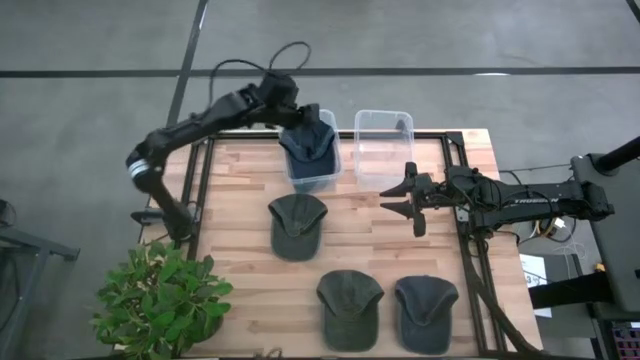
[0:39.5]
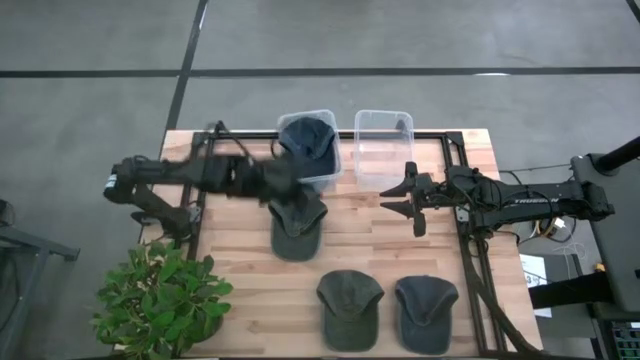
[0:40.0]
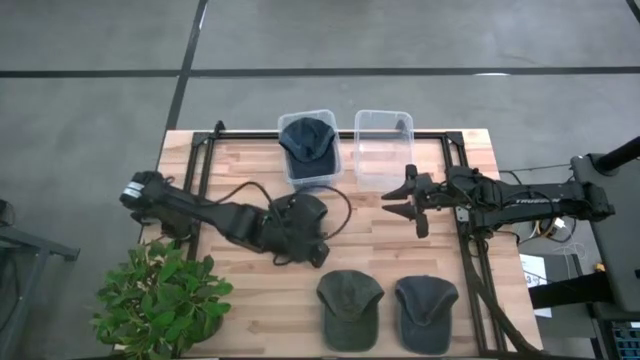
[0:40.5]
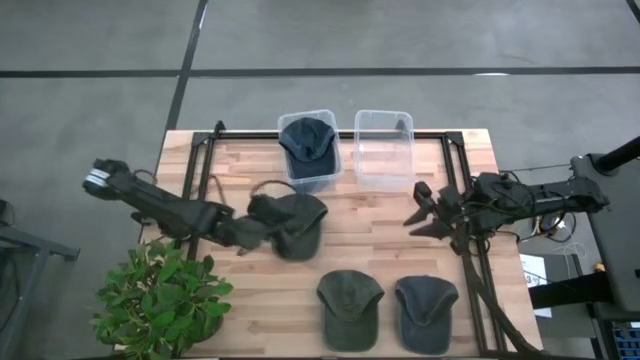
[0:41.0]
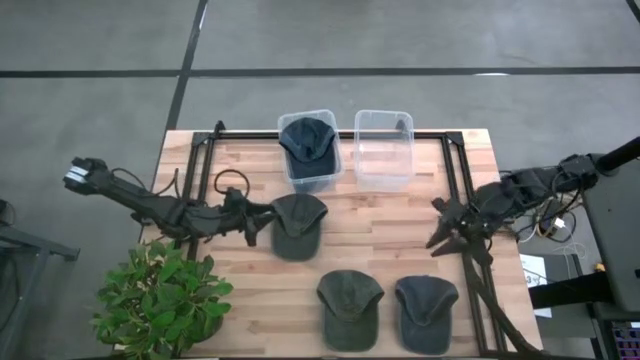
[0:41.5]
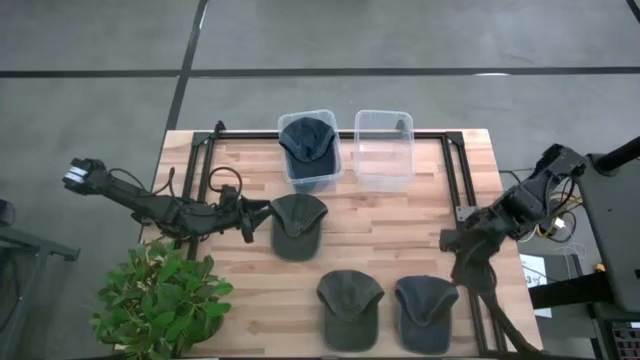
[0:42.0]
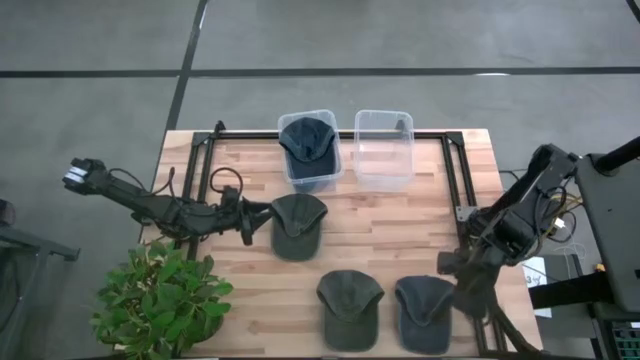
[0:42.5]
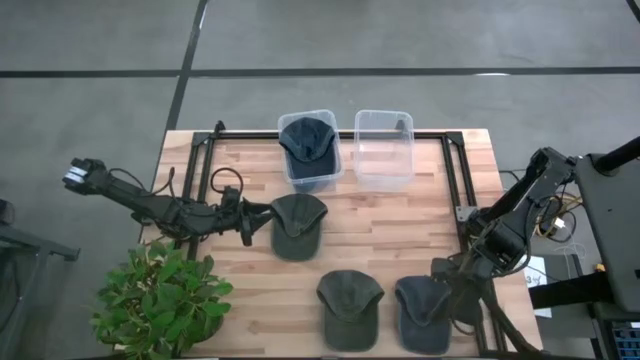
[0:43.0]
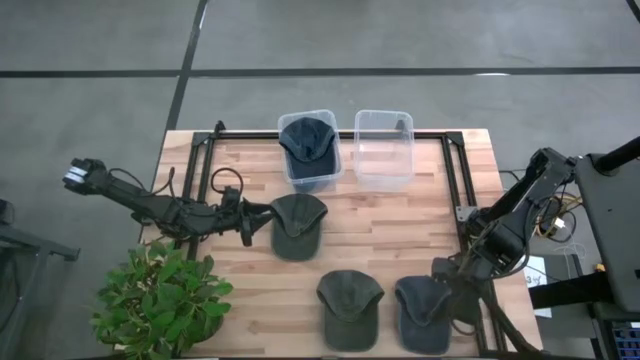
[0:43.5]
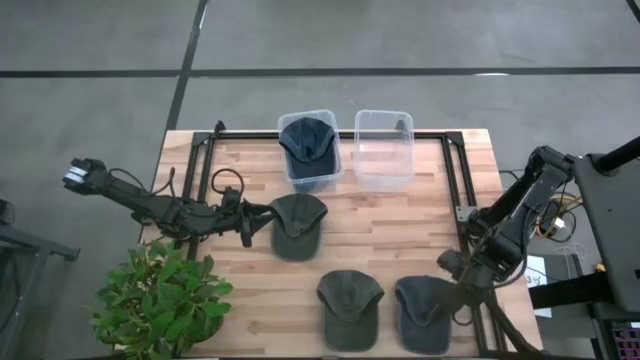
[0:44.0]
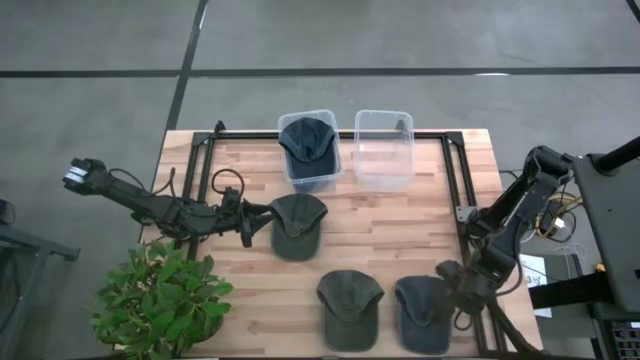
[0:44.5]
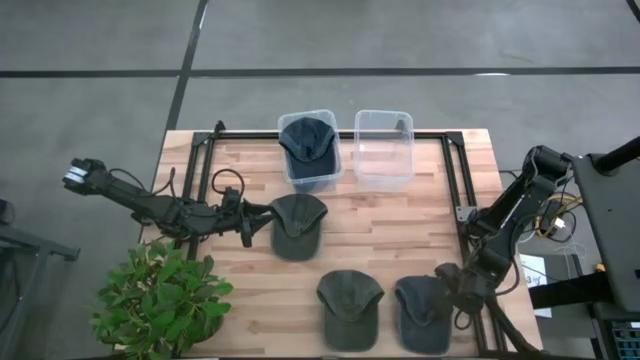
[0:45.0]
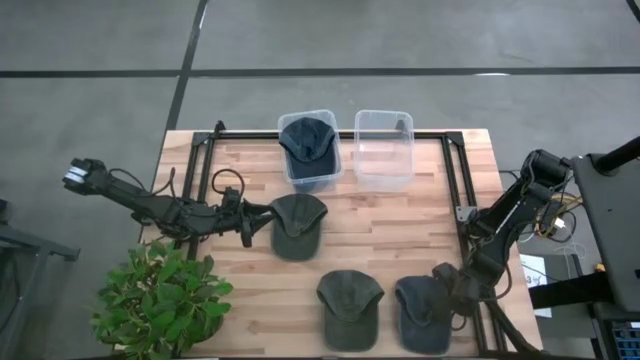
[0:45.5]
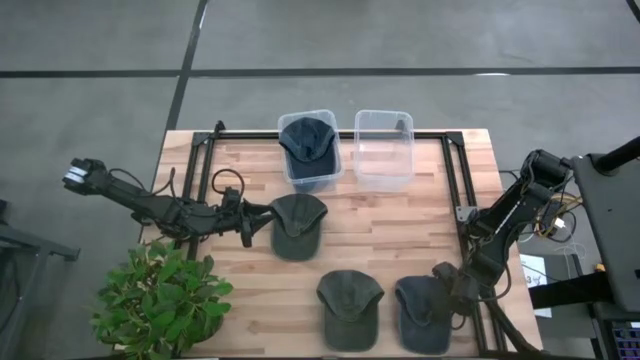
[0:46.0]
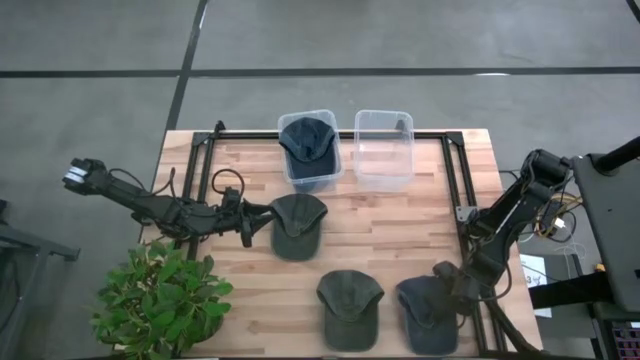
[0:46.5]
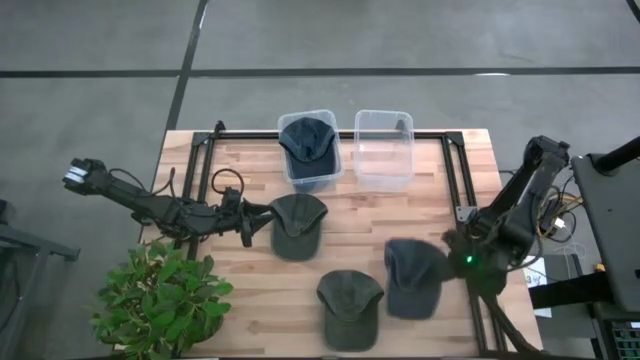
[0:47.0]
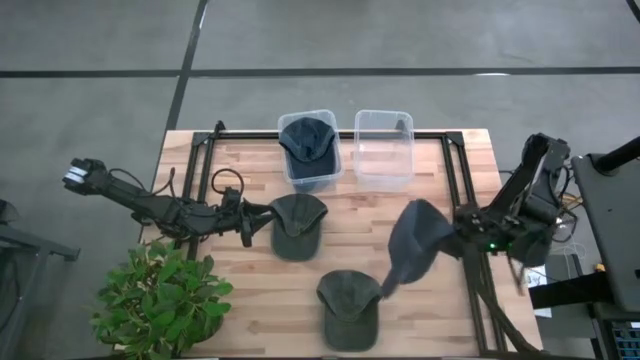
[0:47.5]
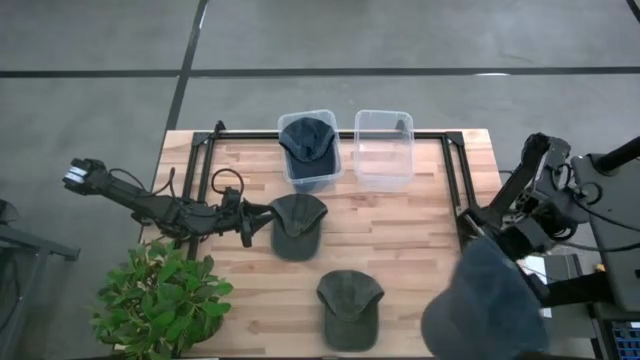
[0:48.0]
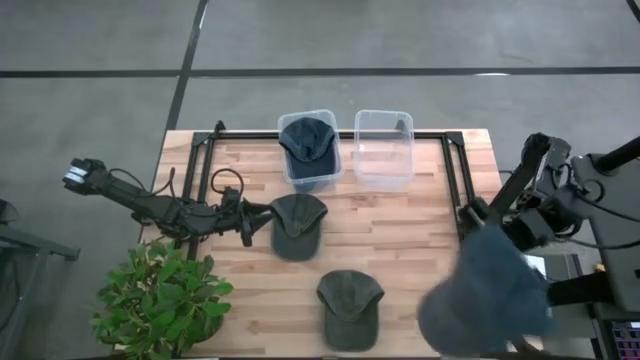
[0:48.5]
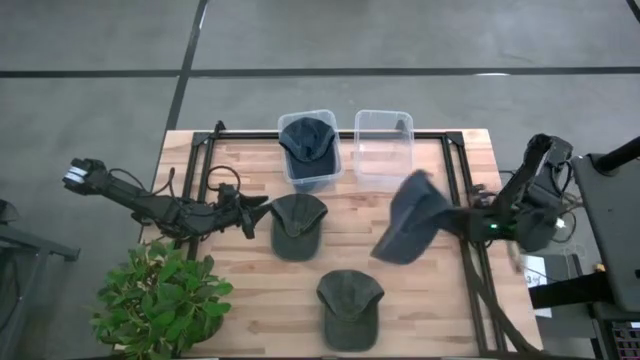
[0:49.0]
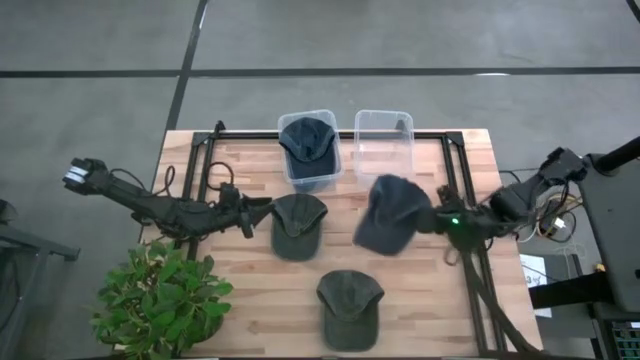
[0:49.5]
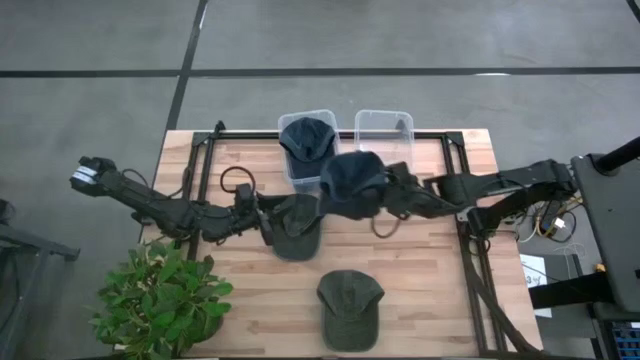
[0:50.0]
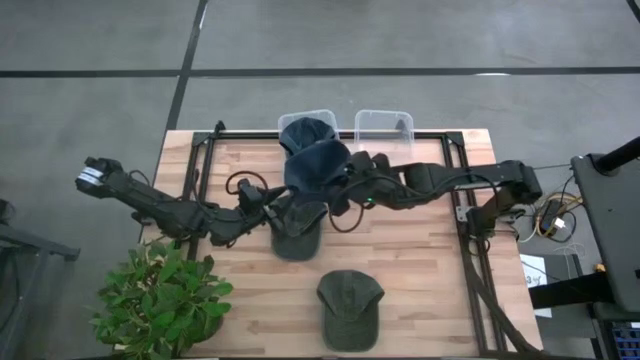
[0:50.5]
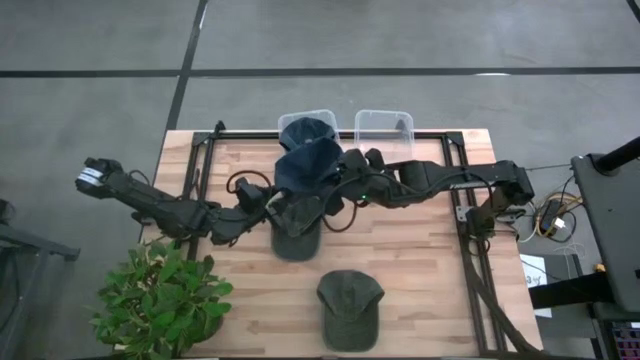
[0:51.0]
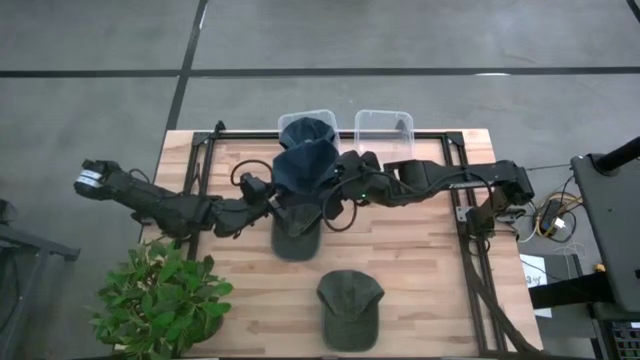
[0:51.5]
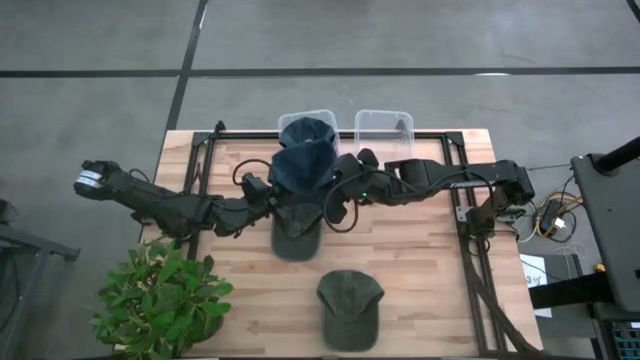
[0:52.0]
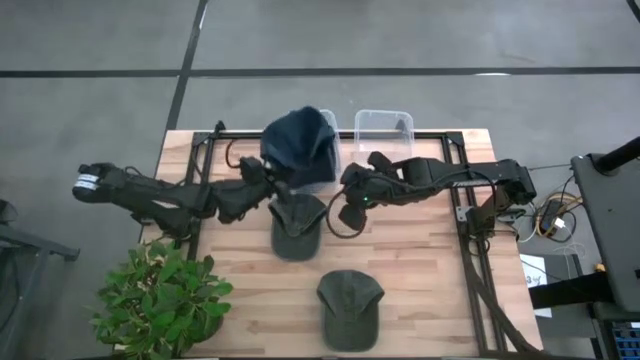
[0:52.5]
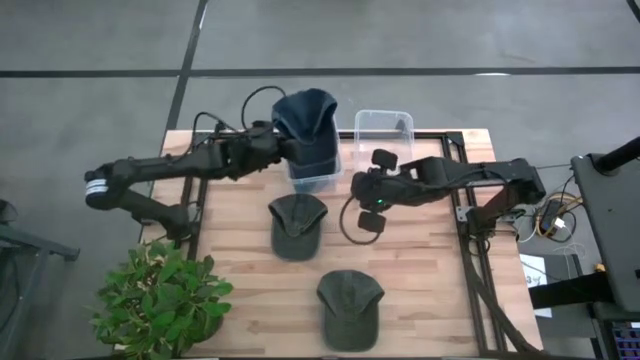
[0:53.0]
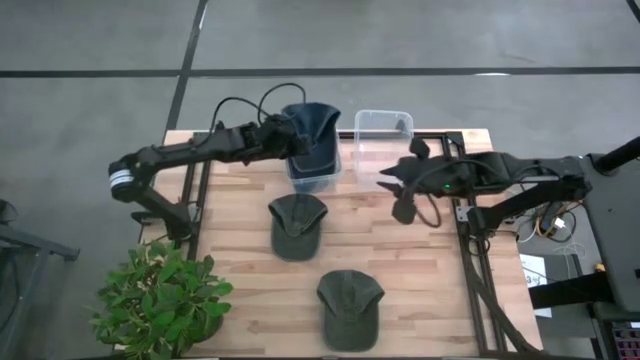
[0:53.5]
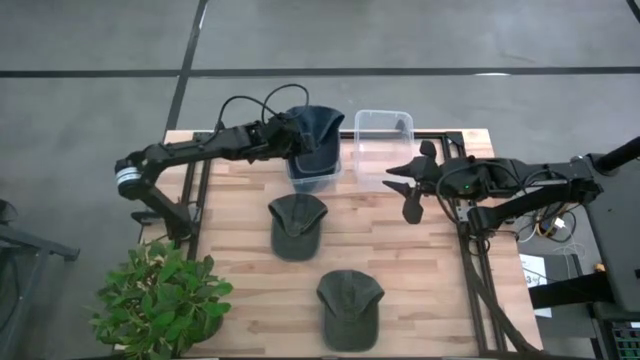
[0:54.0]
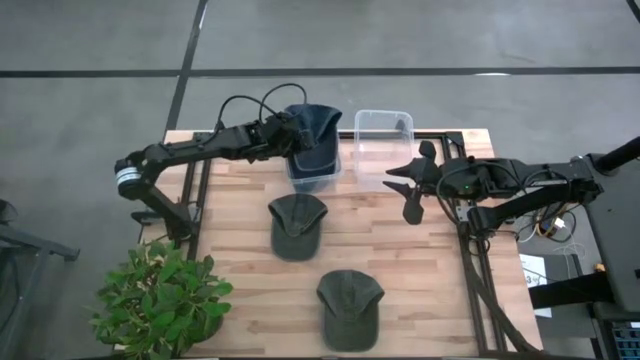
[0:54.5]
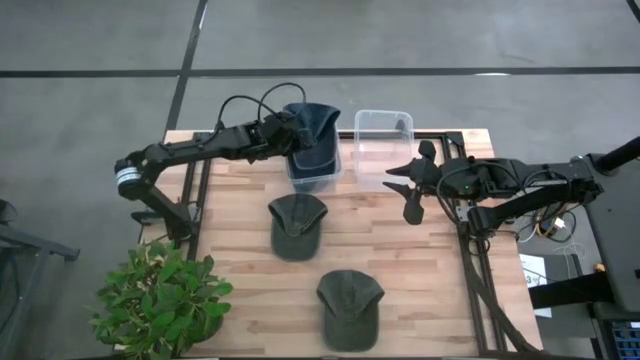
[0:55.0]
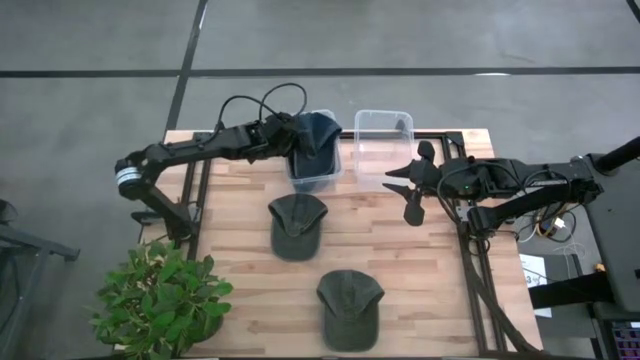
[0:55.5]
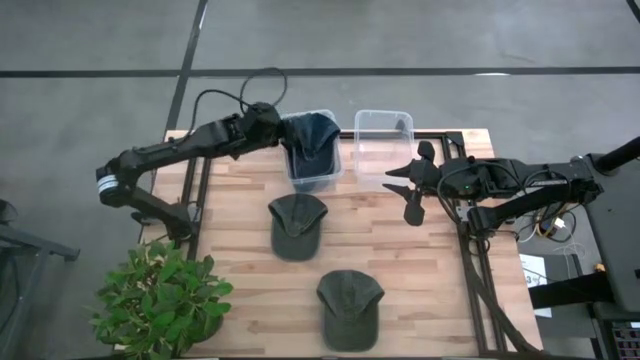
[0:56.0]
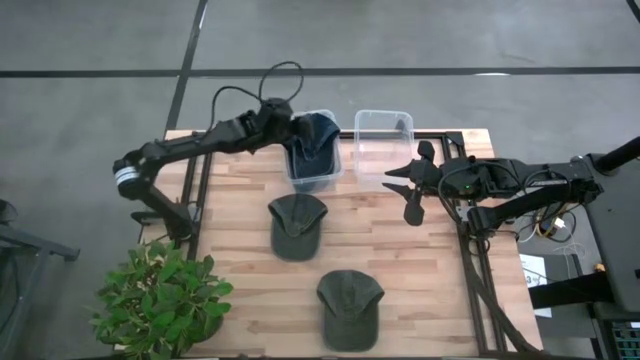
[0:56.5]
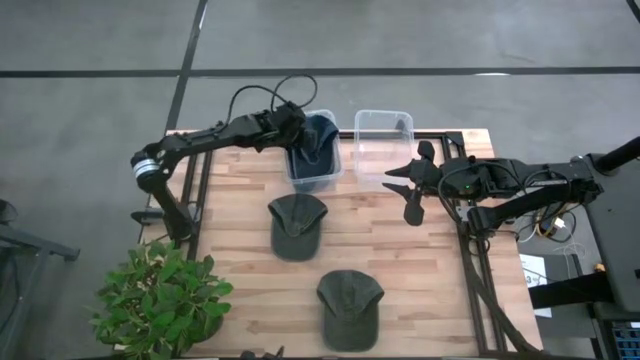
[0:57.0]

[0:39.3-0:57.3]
Task: Pick & Place hat
Put the blue cap into the left transparent bin

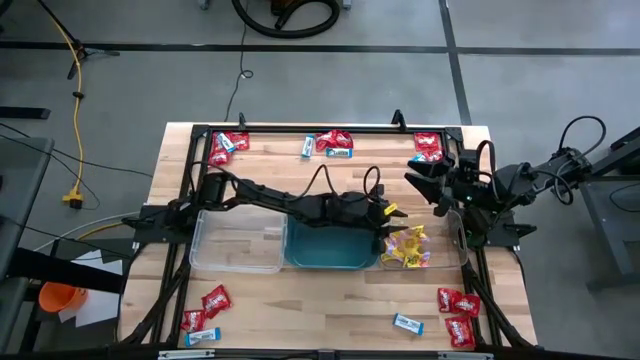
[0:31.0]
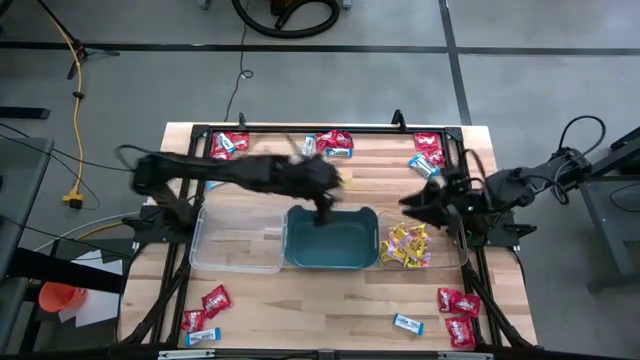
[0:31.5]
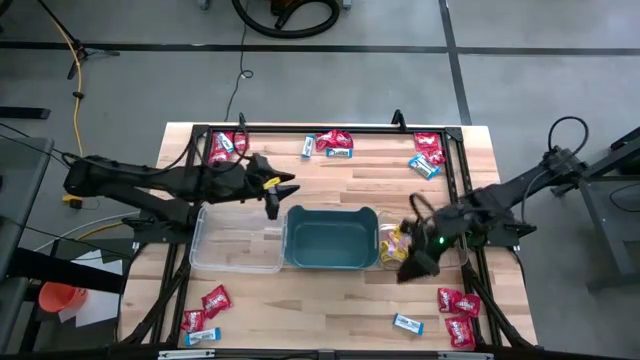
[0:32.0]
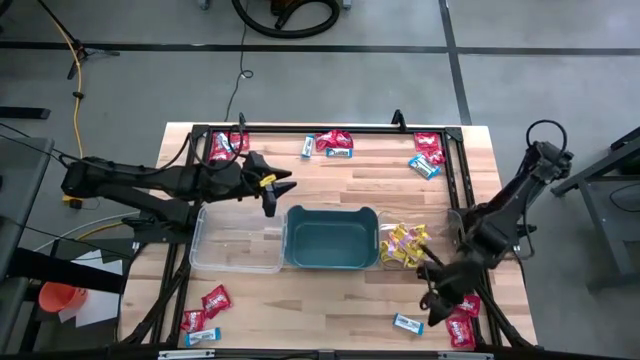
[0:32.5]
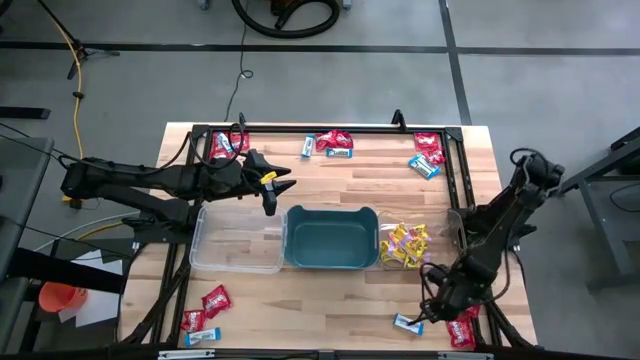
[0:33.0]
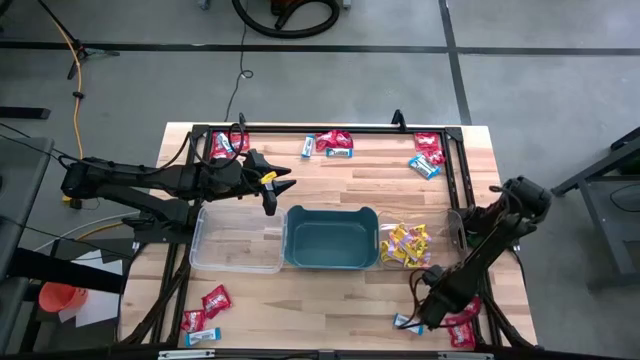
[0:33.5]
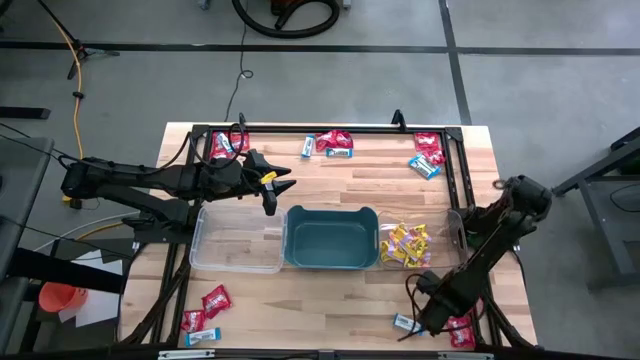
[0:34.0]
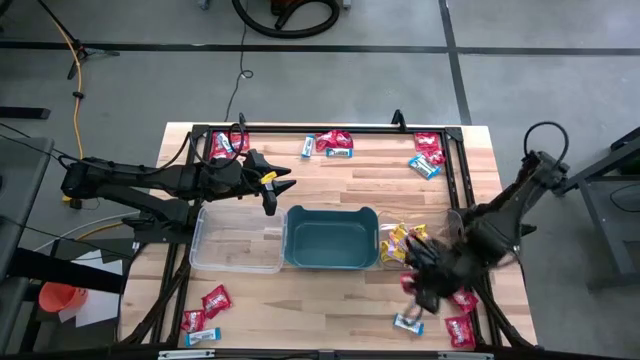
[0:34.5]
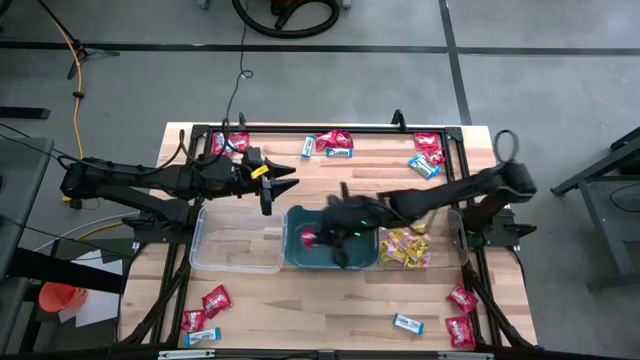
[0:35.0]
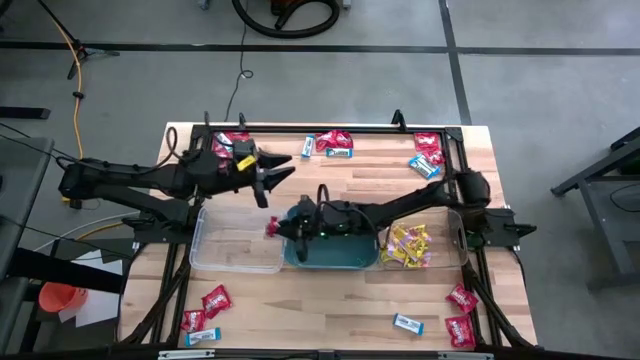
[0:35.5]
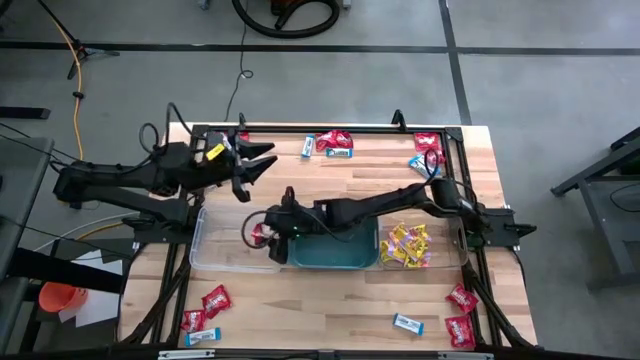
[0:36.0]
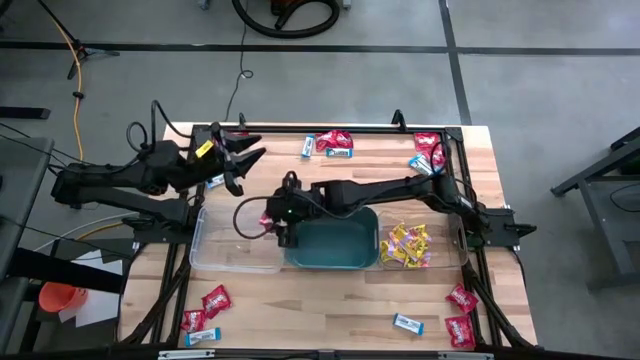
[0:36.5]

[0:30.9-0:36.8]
Task: Sort candy
Put the red candy into the left transparent bin
